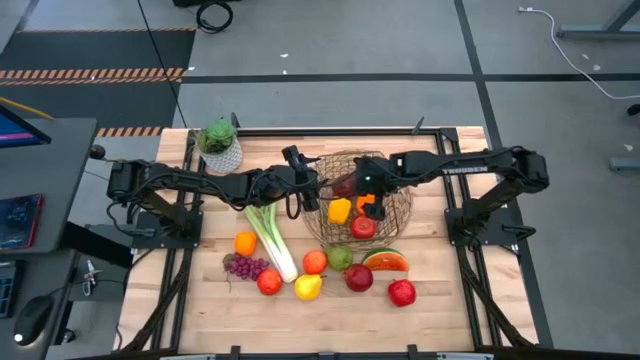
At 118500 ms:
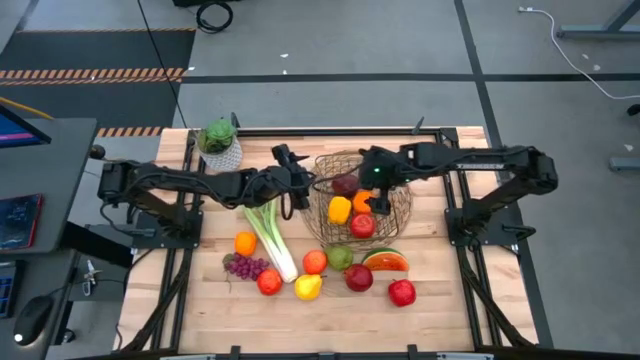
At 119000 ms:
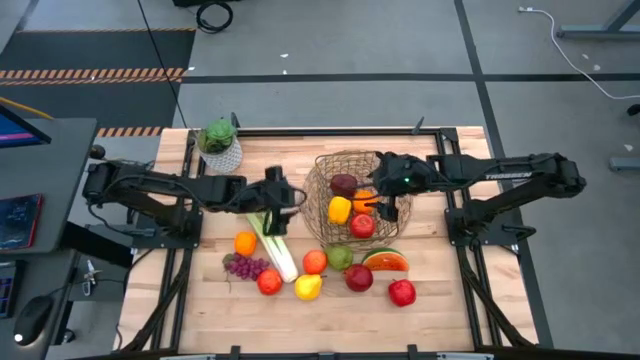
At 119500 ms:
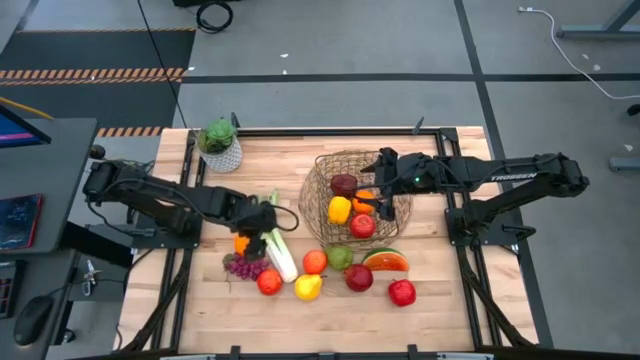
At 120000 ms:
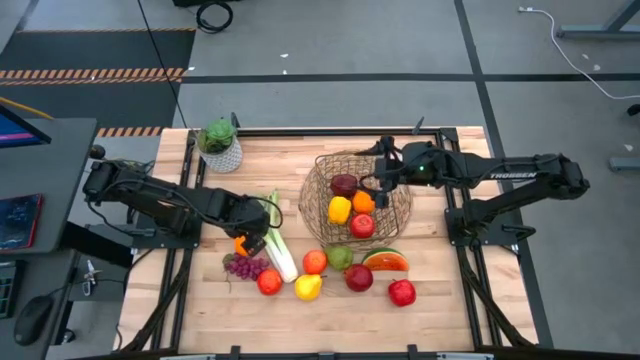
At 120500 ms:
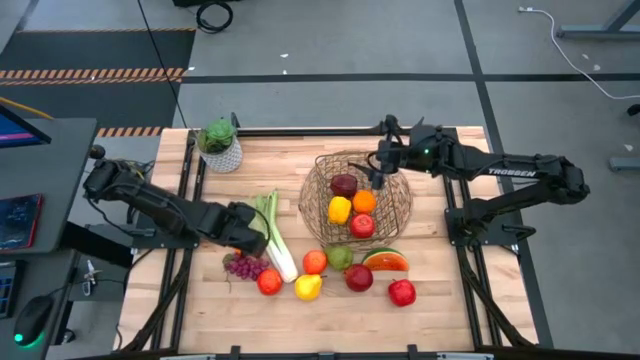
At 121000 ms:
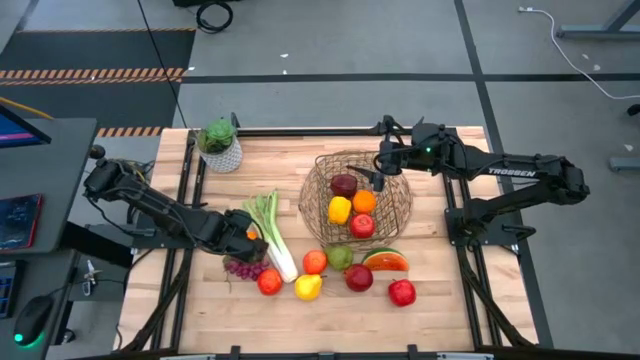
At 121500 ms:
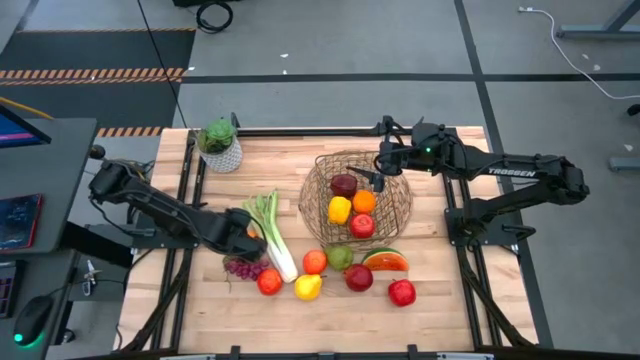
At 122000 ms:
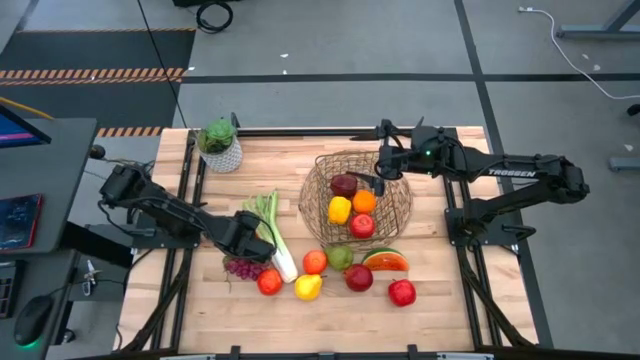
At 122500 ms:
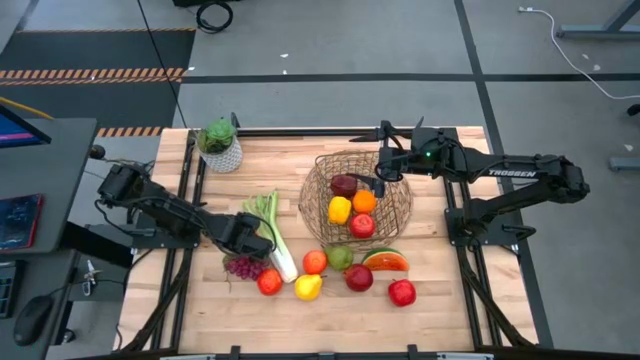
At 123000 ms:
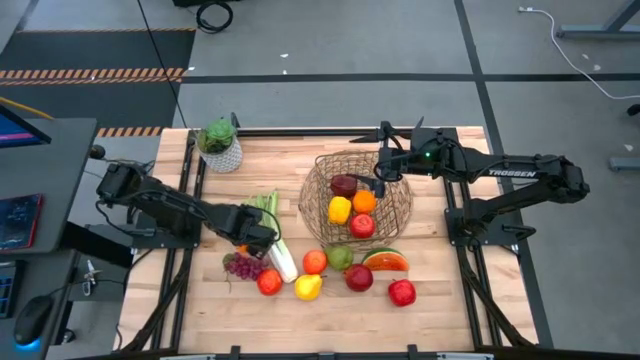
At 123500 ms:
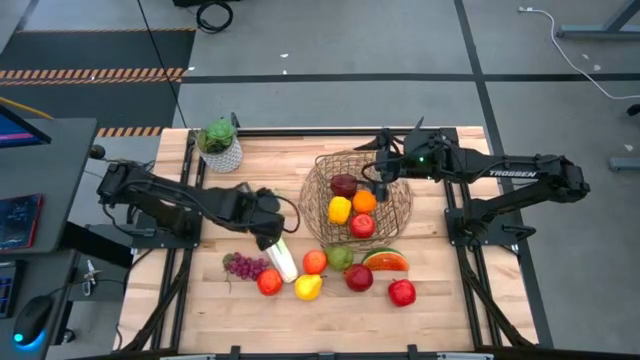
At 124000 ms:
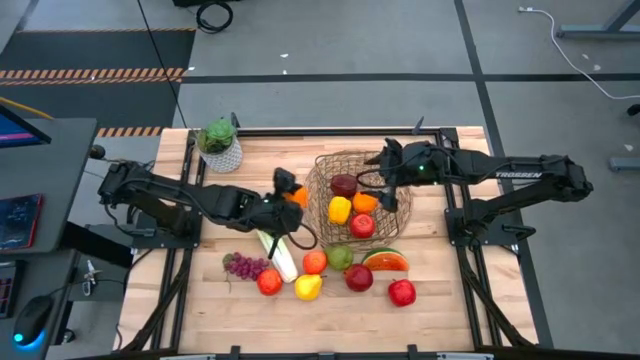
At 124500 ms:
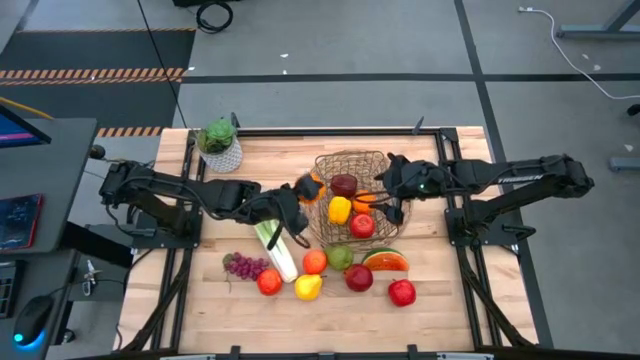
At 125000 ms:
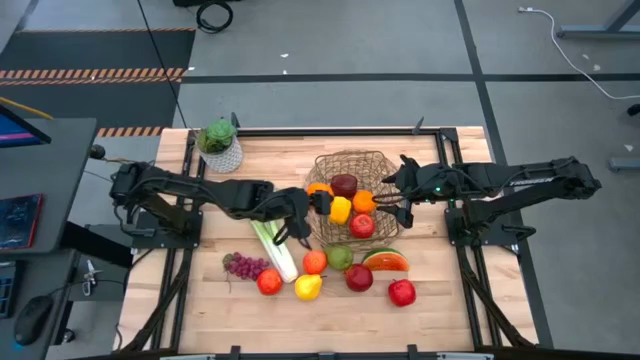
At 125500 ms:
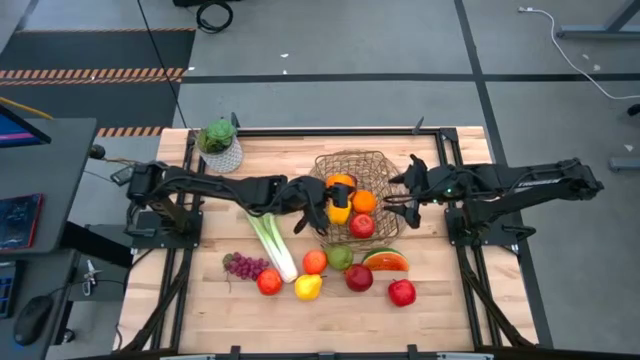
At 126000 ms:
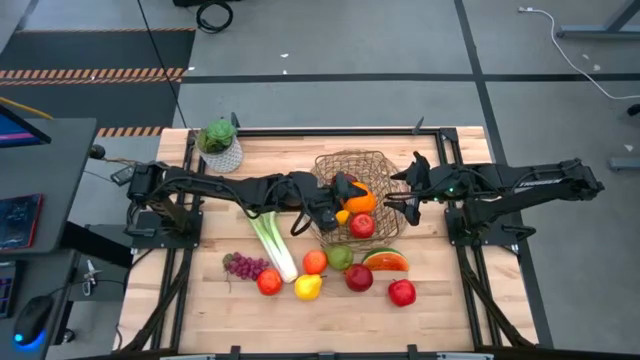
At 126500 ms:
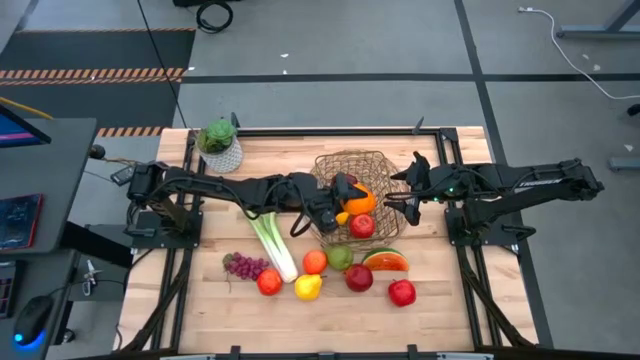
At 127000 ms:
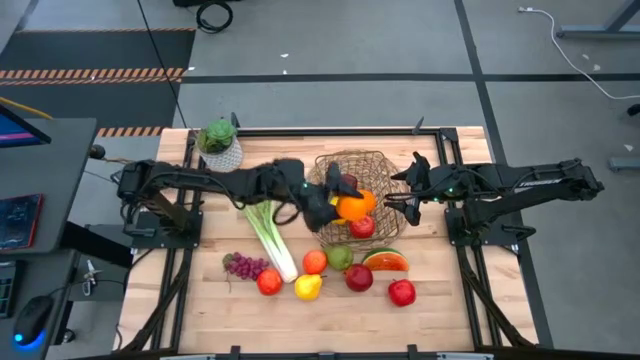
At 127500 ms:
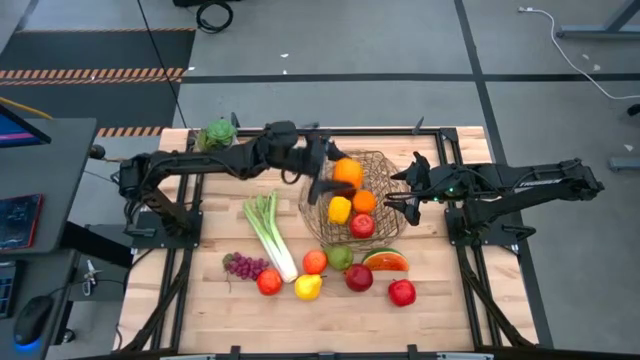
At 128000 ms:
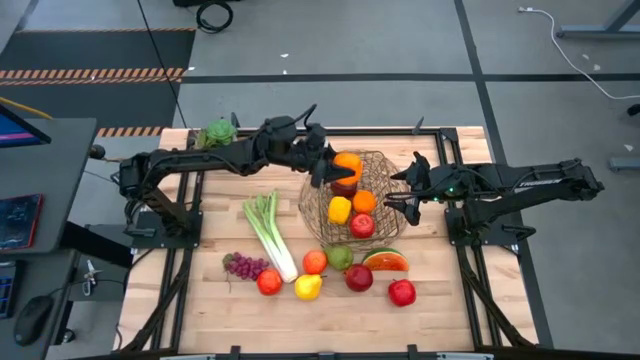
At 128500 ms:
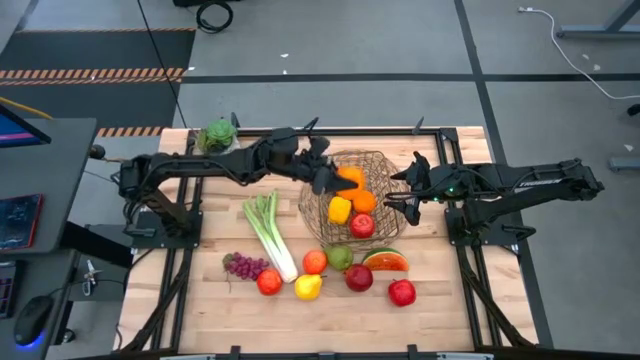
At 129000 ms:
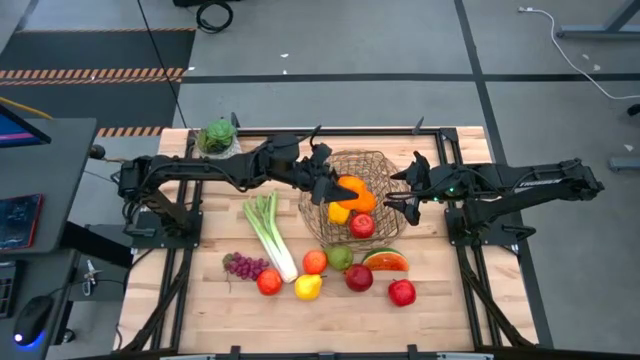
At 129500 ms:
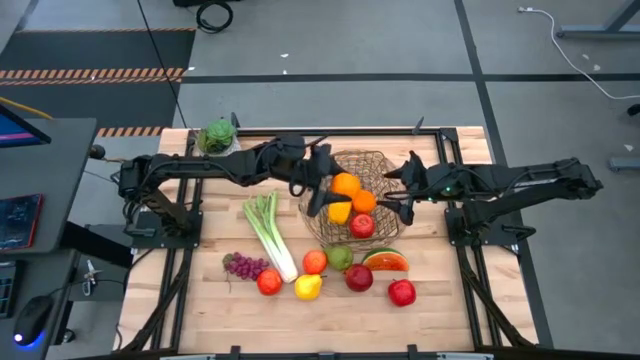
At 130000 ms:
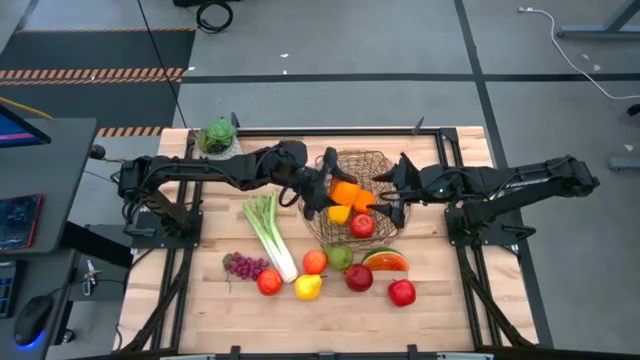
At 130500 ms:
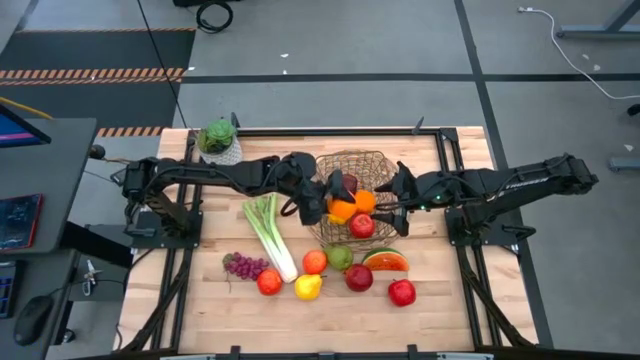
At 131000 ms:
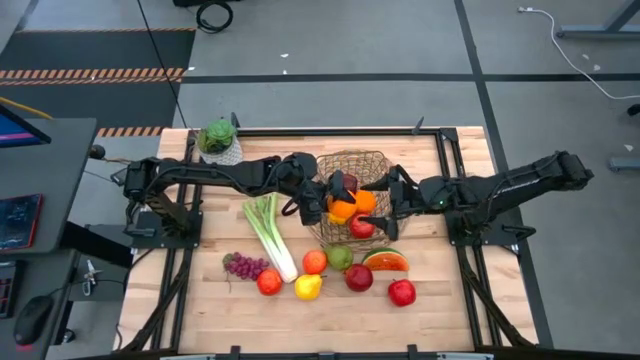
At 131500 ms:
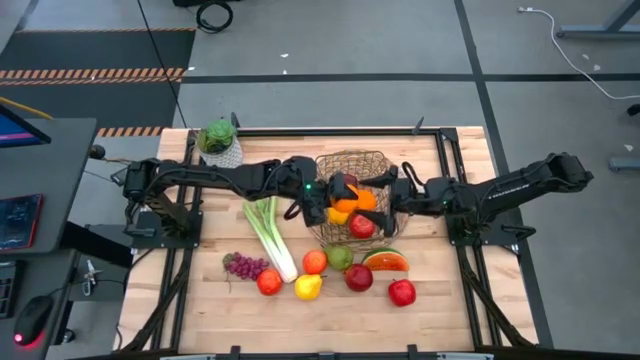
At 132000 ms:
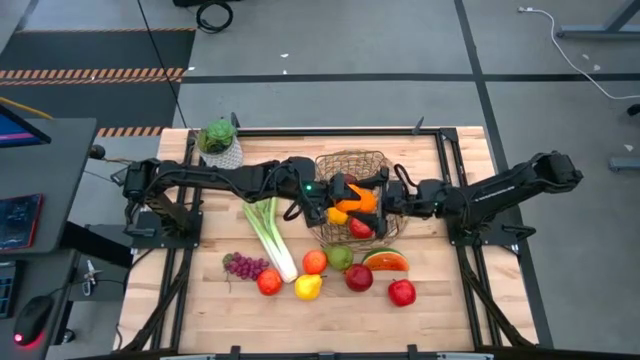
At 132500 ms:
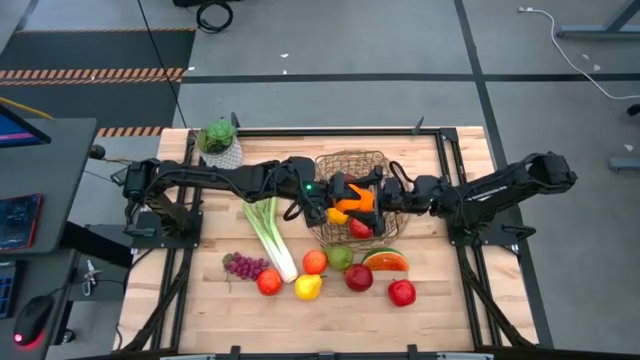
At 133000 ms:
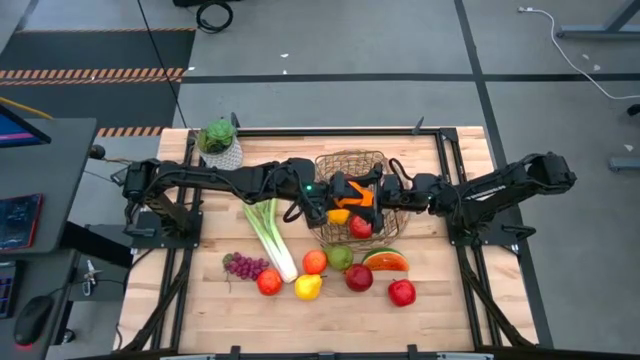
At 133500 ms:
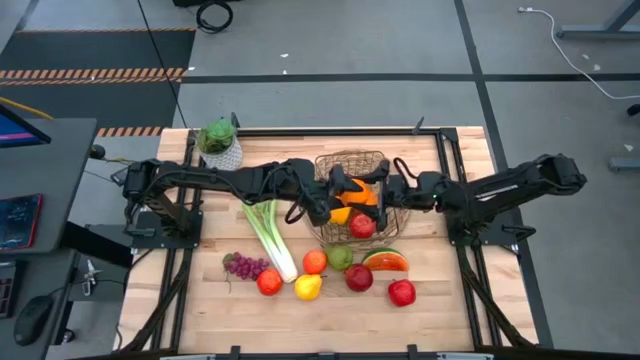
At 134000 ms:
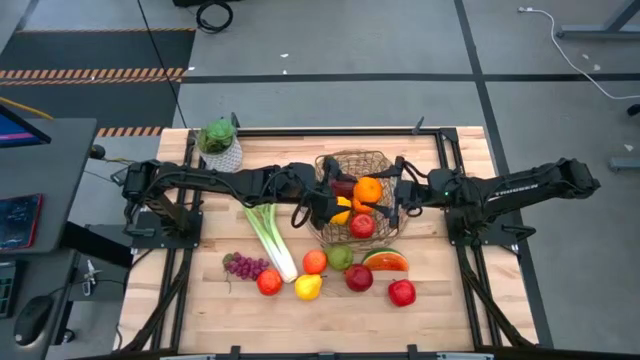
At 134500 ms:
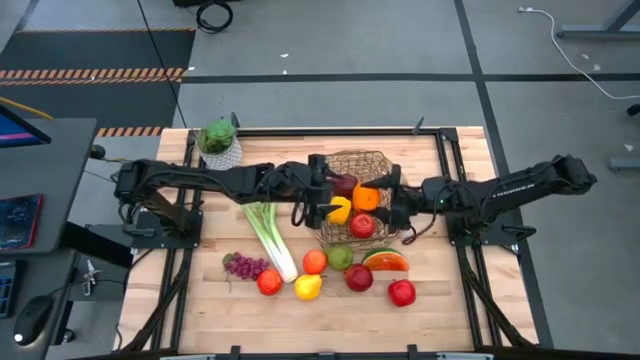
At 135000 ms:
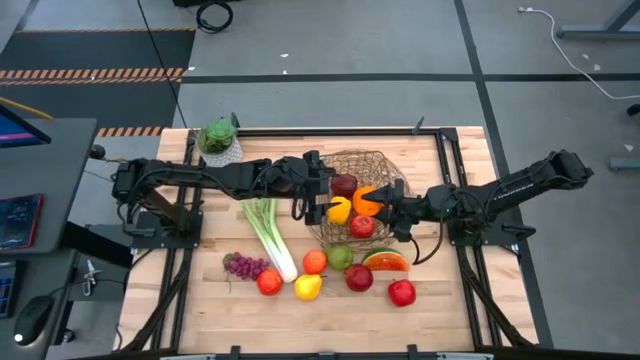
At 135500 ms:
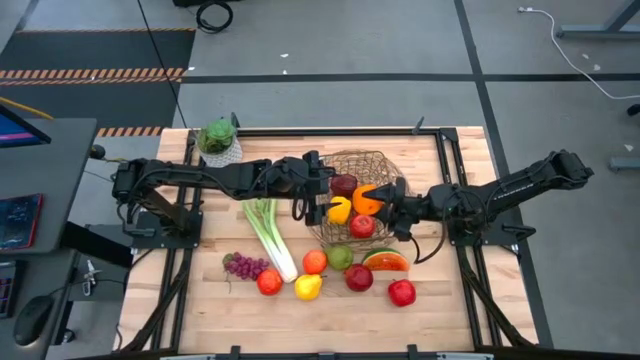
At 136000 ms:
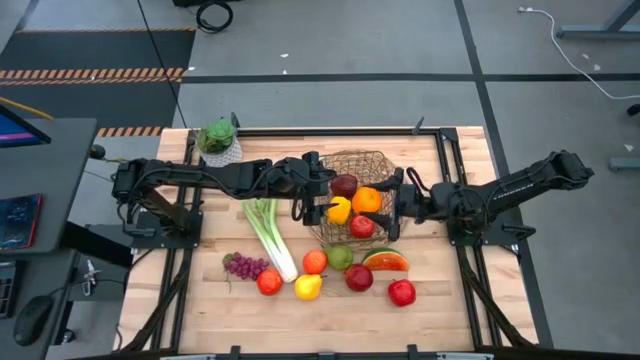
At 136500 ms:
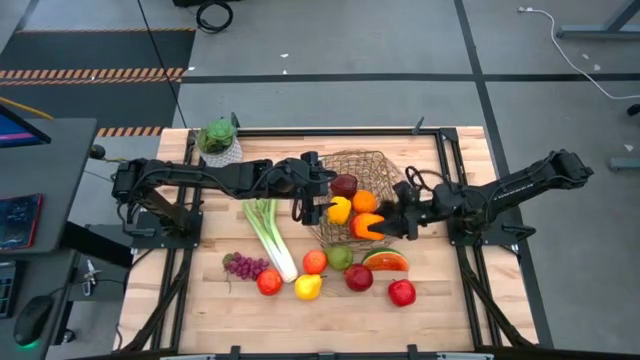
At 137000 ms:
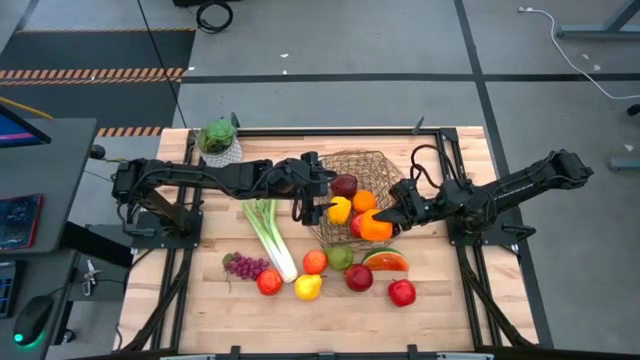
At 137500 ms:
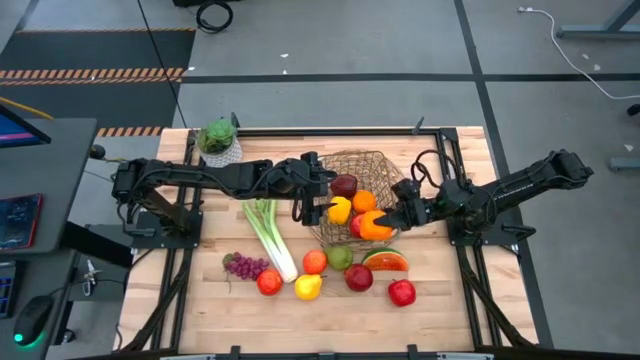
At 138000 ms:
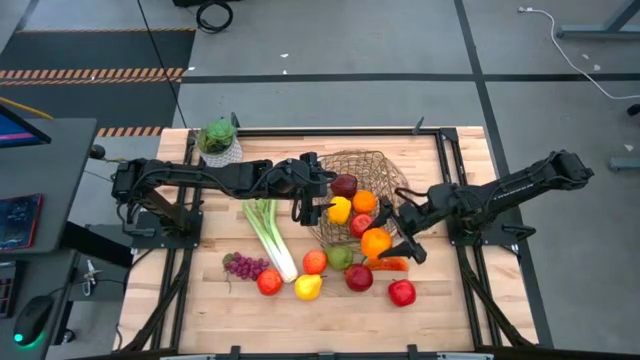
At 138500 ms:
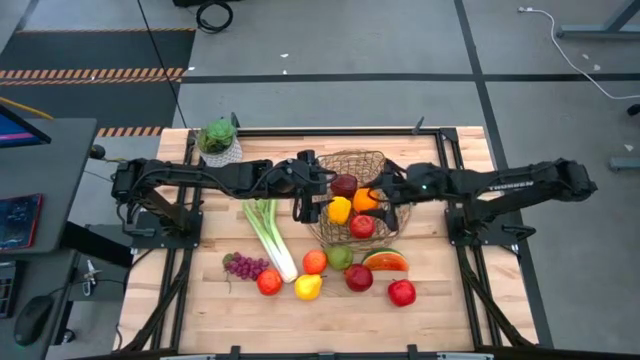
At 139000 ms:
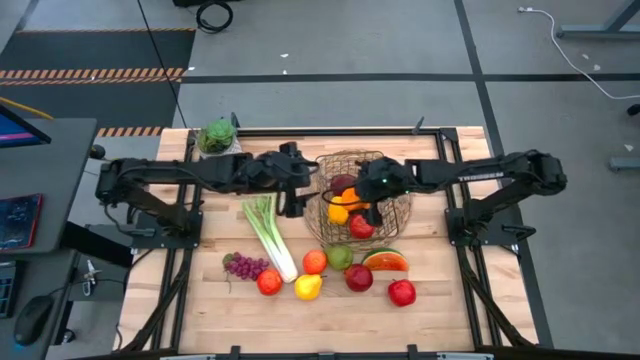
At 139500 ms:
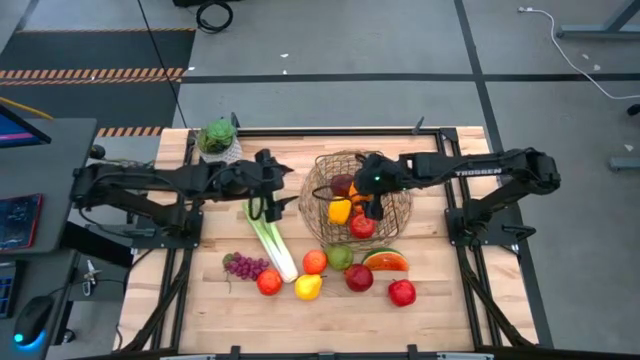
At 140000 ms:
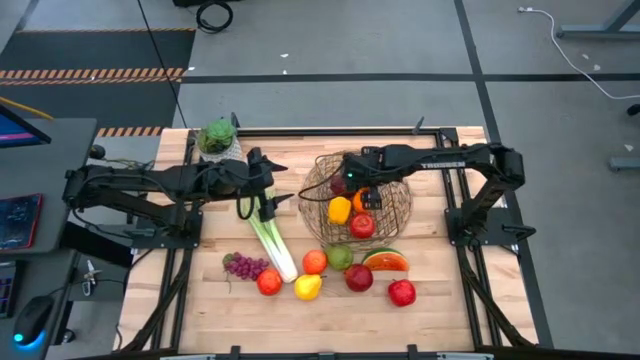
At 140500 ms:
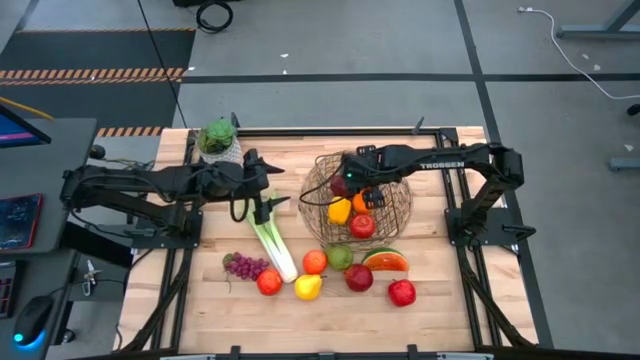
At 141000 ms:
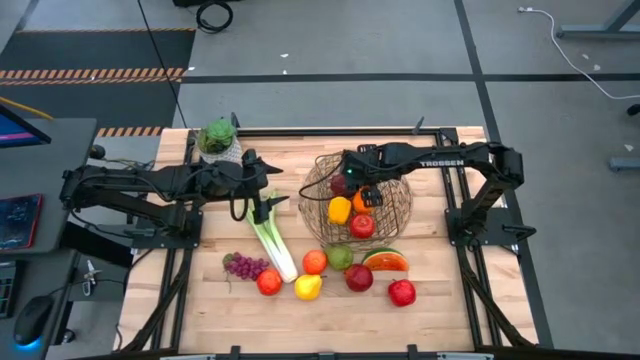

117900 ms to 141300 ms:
Task: Build produce basket
Put the orange into the brown wire basket
